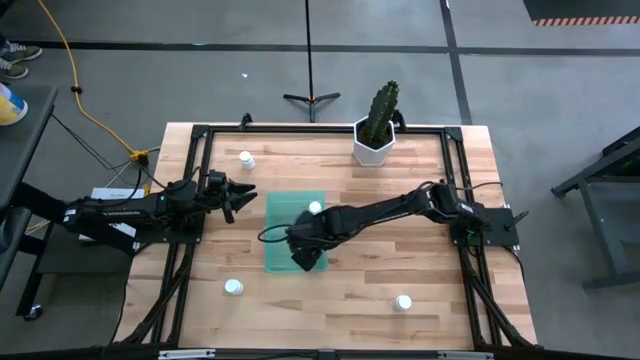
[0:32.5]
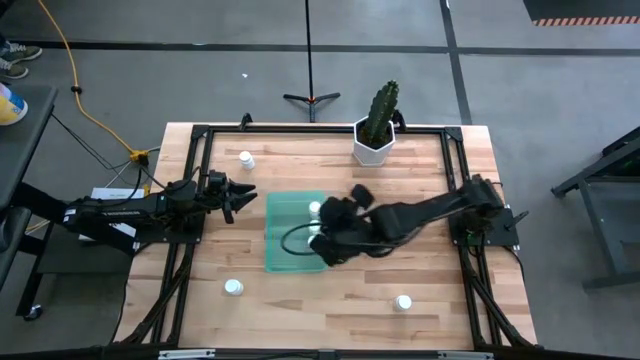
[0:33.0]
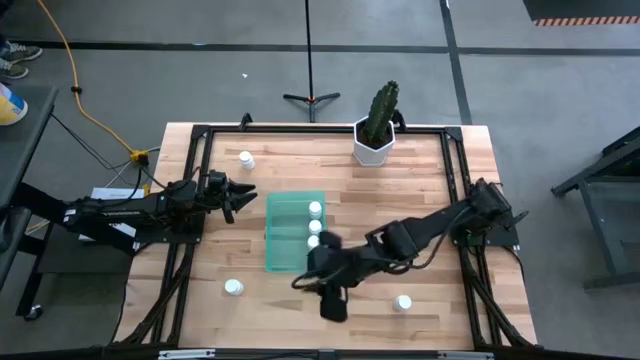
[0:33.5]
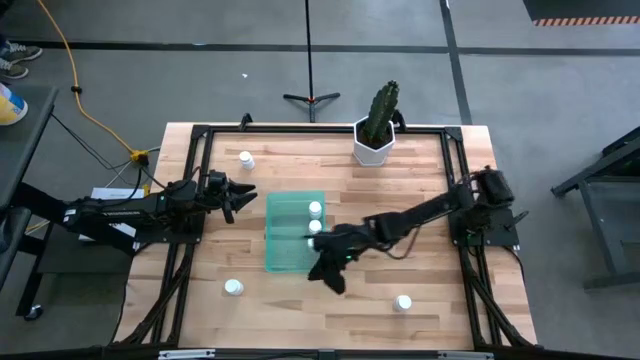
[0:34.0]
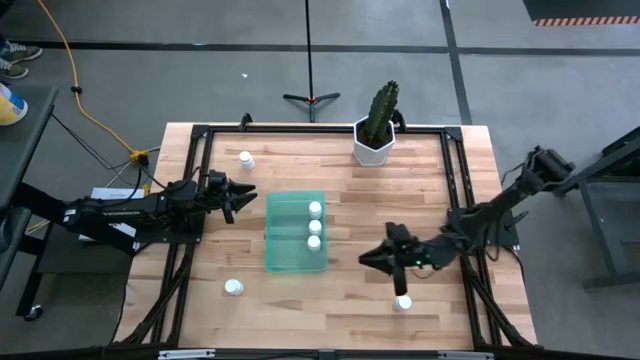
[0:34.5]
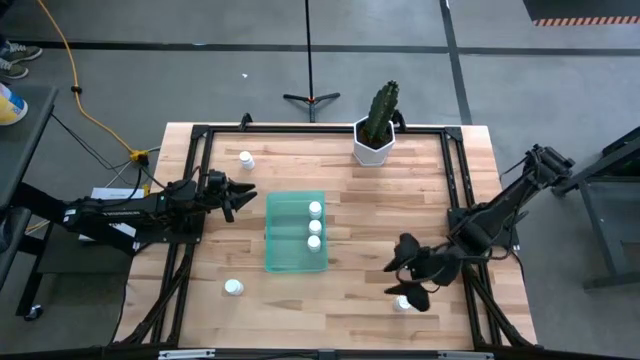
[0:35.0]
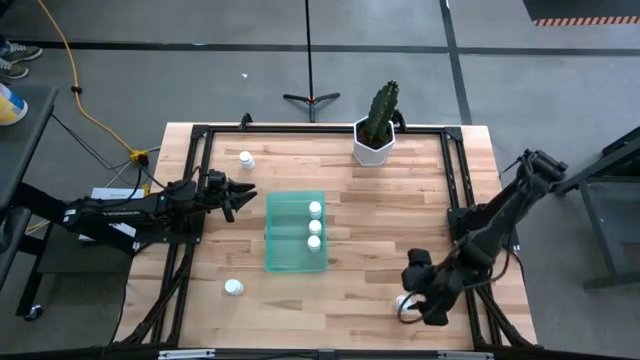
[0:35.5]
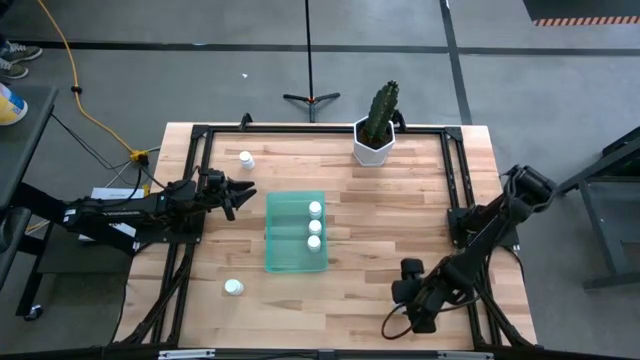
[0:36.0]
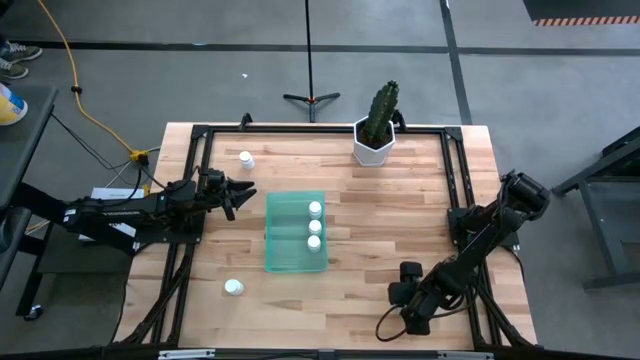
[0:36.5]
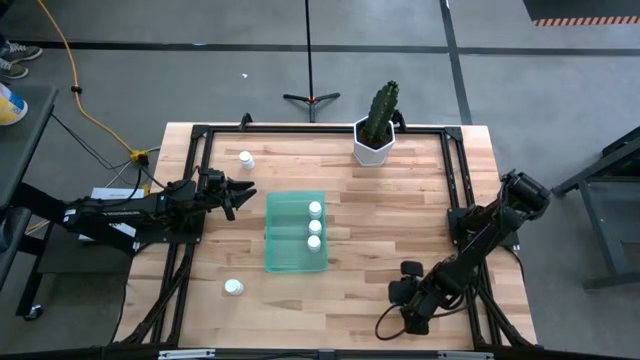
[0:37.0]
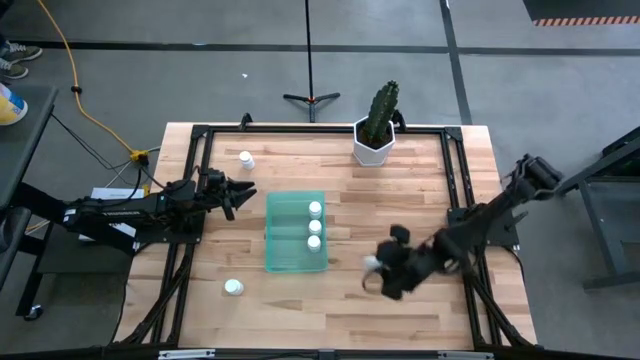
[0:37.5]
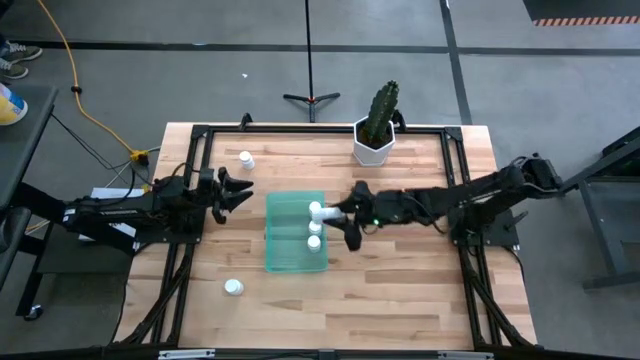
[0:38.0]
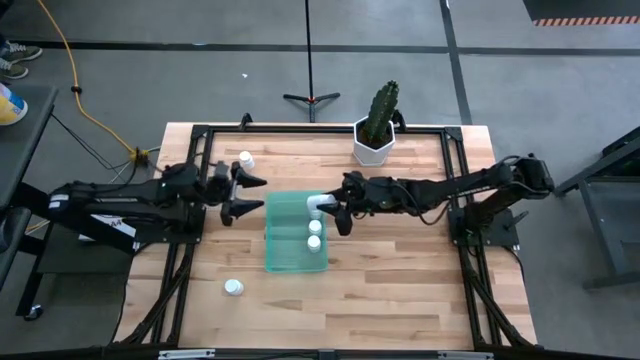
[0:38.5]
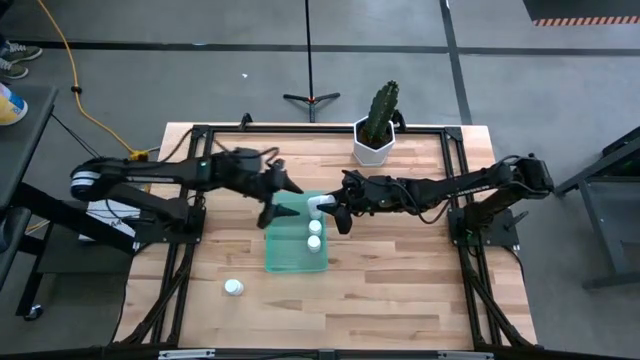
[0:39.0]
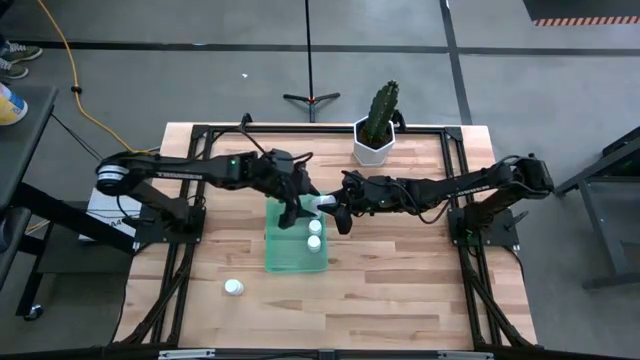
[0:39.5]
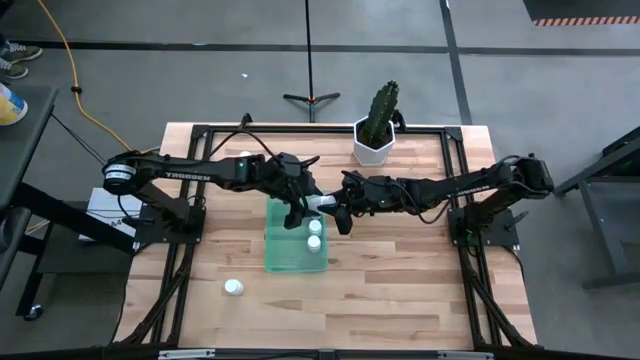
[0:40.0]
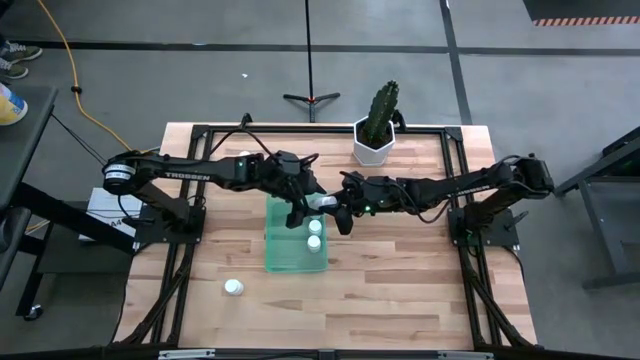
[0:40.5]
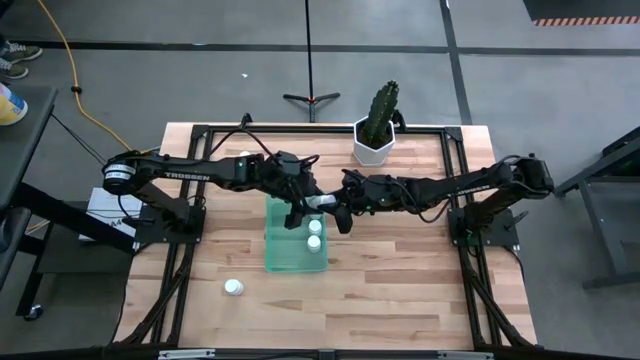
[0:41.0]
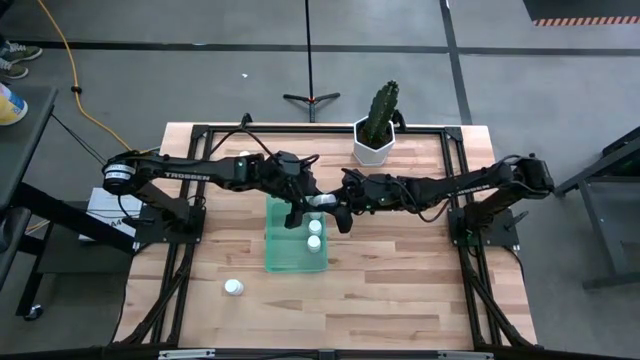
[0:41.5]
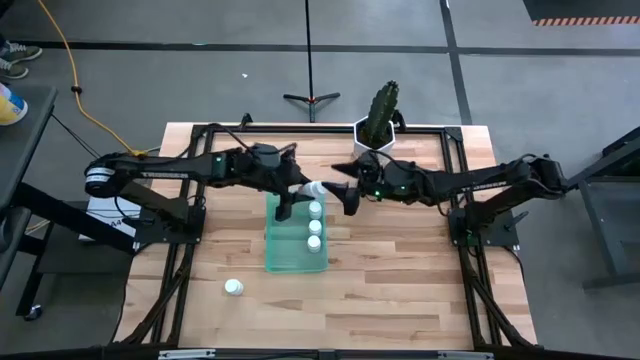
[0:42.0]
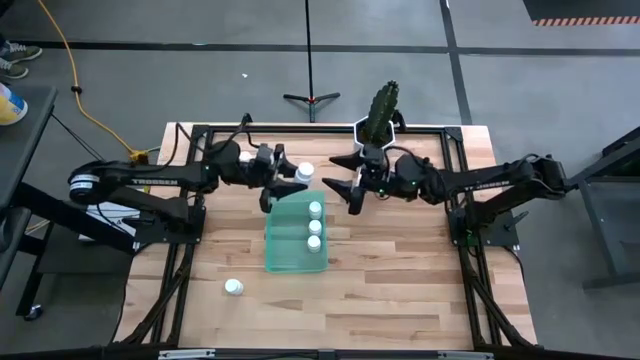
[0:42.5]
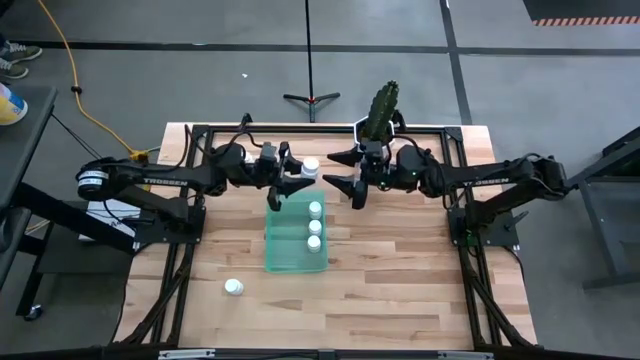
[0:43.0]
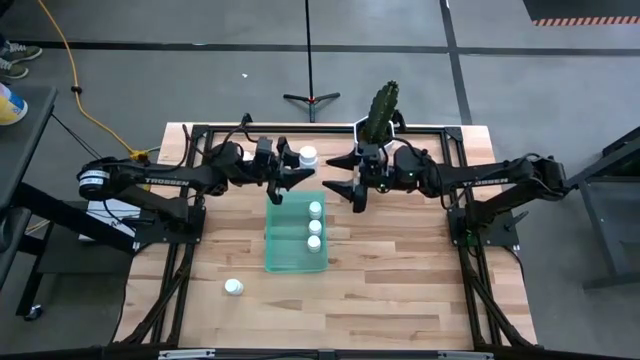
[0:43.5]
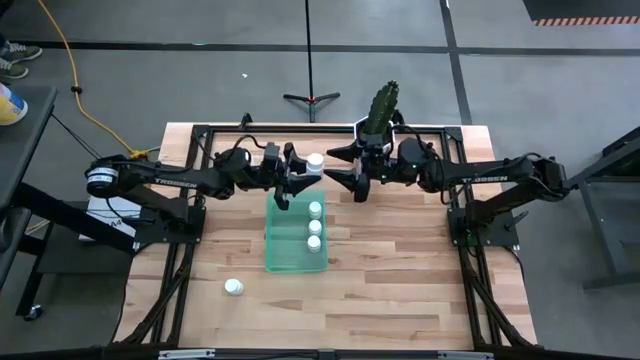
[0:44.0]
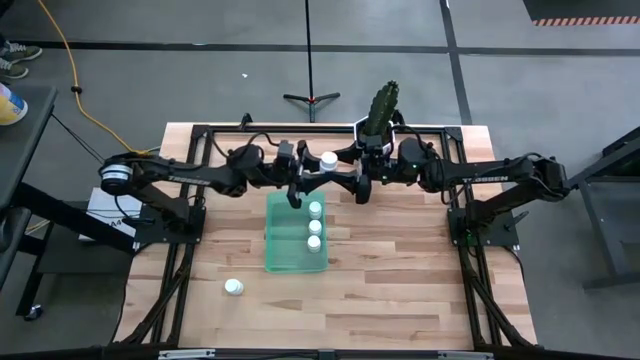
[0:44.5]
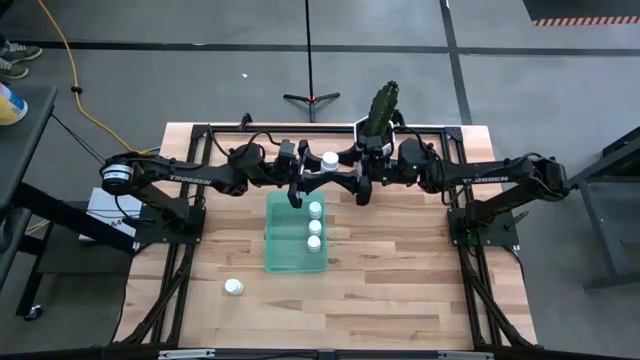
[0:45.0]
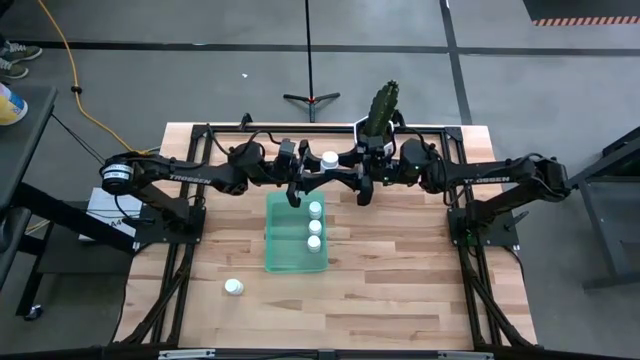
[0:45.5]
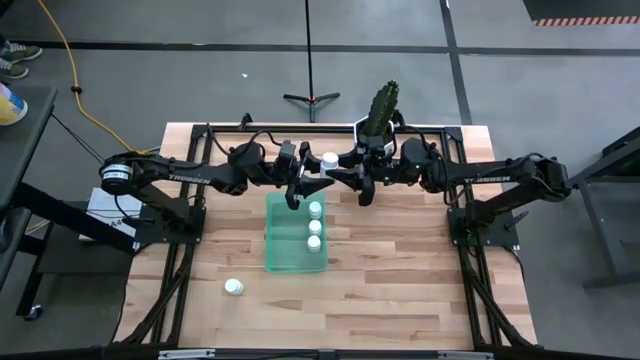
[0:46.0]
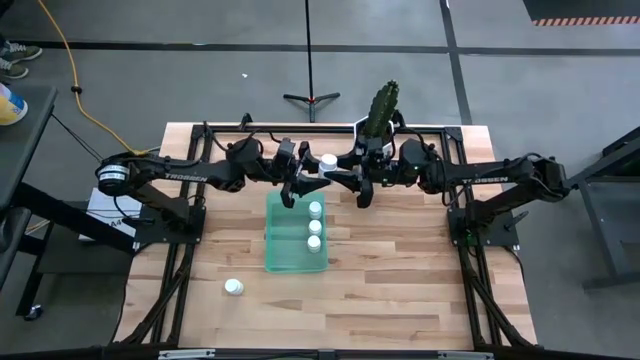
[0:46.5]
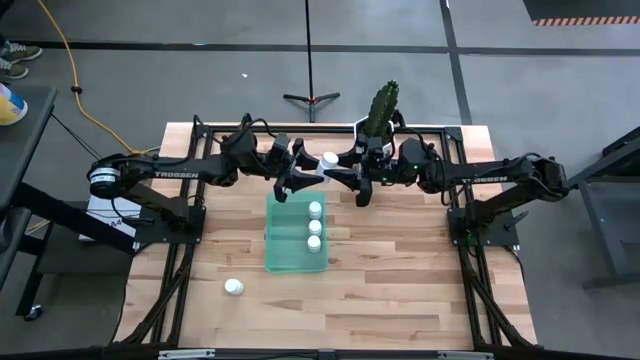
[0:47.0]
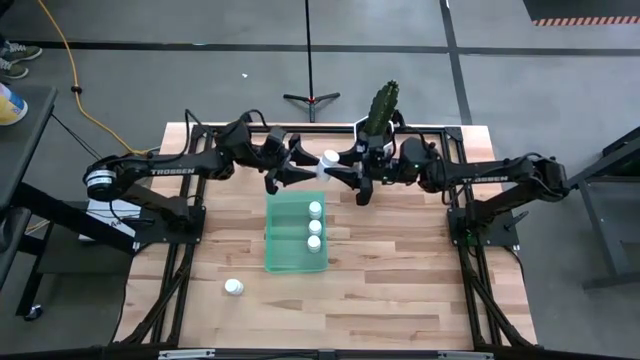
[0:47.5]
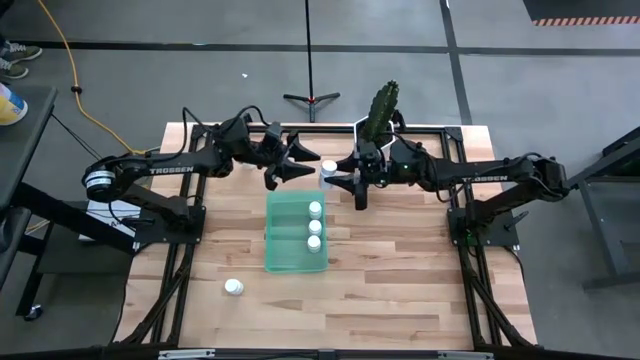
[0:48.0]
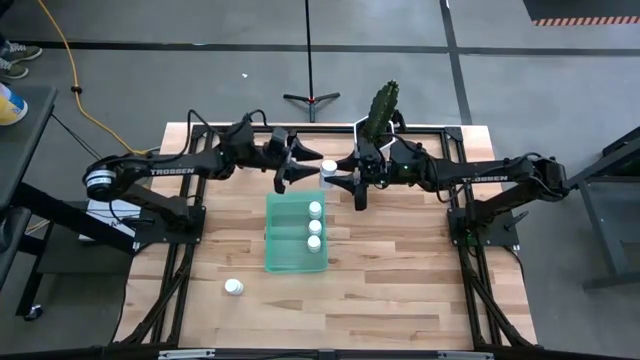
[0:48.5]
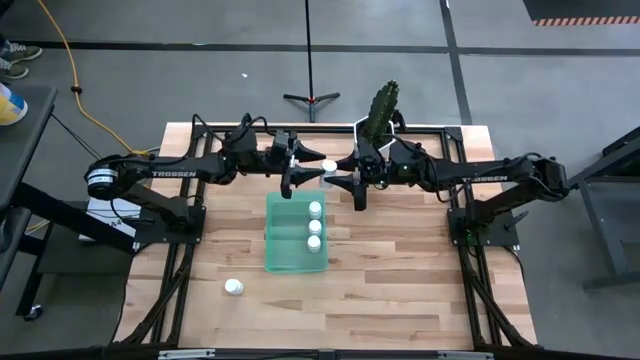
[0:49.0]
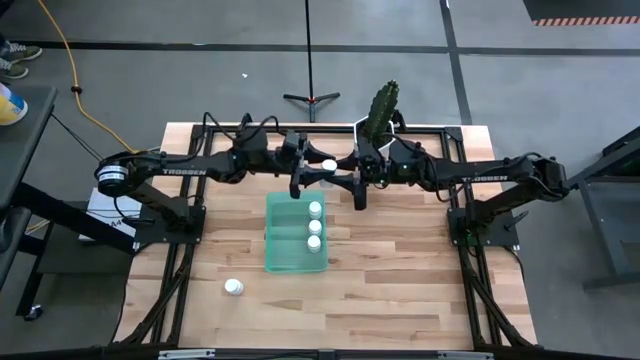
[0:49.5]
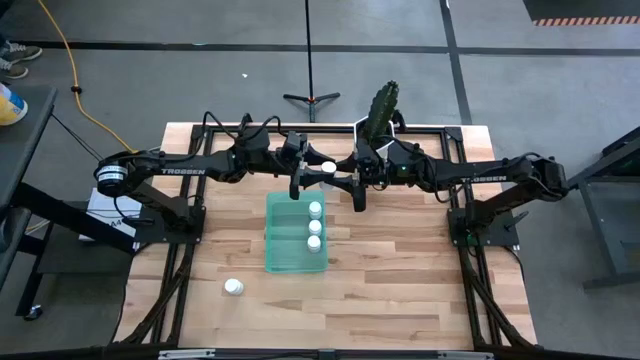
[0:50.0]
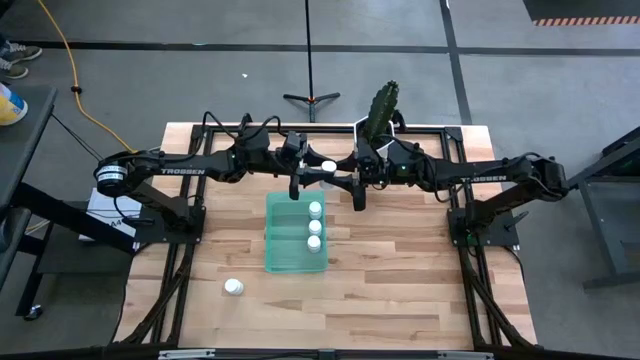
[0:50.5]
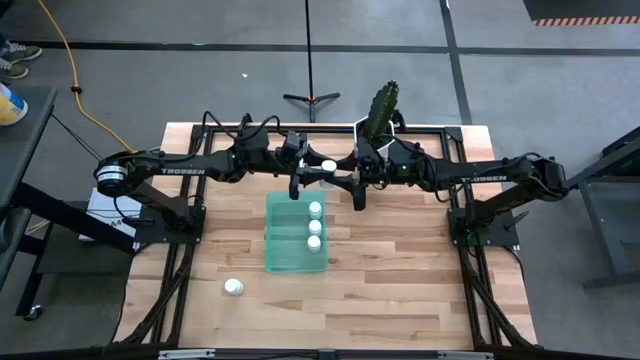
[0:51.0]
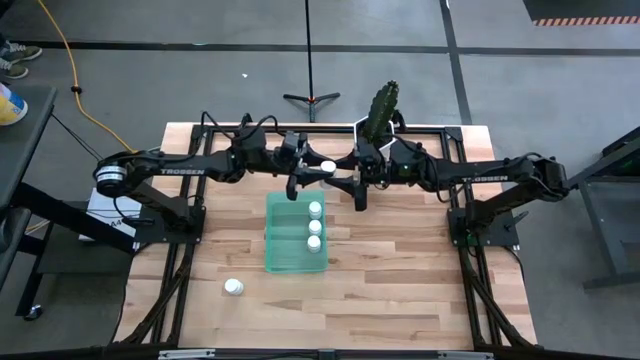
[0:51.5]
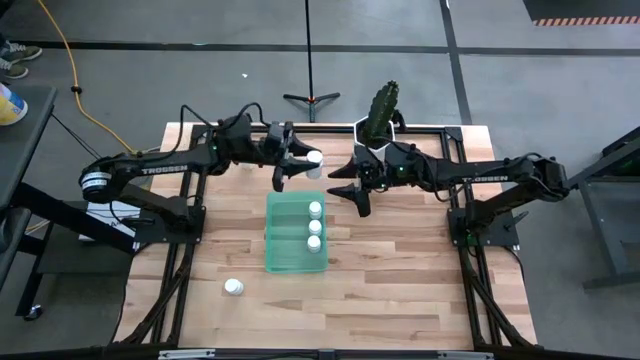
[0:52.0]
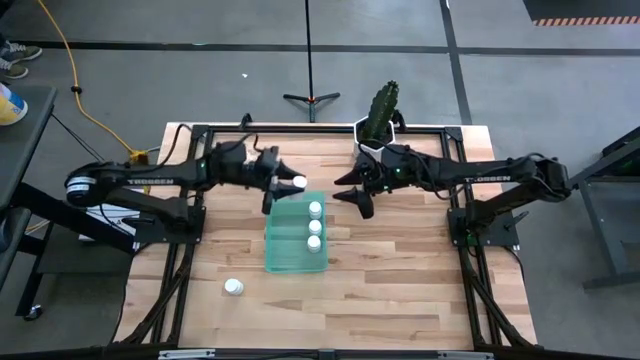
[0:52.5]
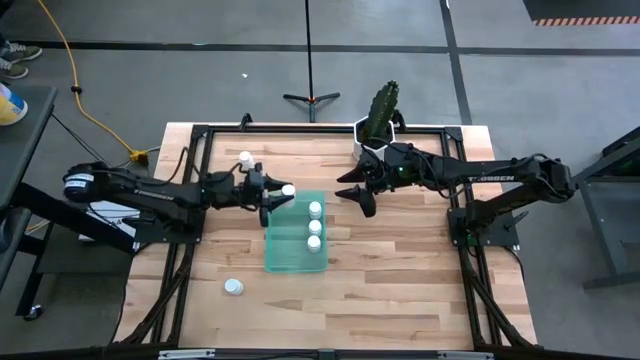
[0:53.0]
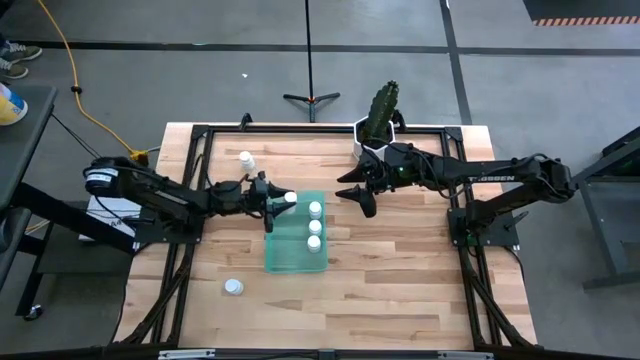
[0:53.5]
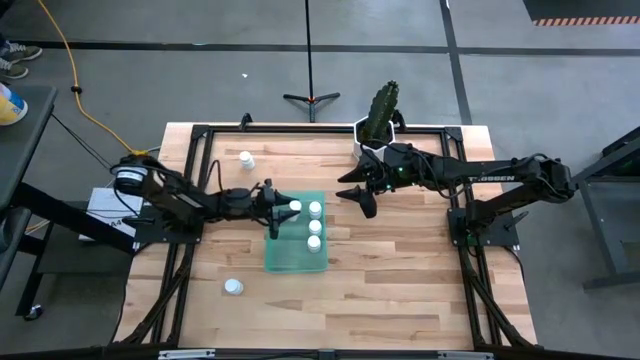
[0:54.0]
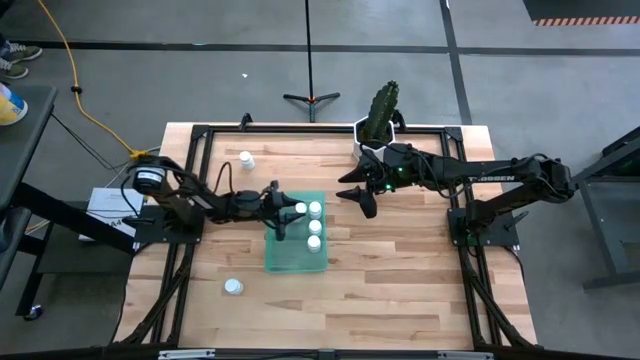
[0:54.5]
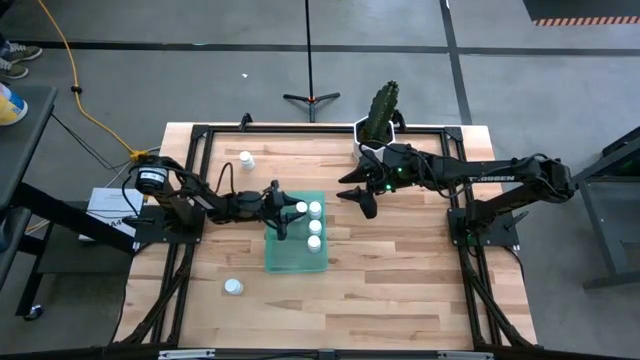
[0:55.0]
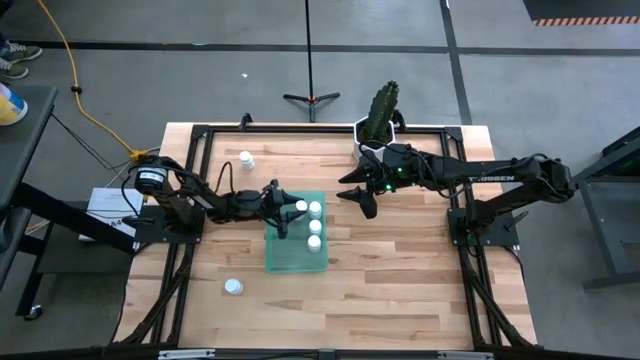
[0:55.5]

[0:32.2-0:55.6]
Task: Pick and place pill bottles into a basket
Put the pill bottle into the blue bin
